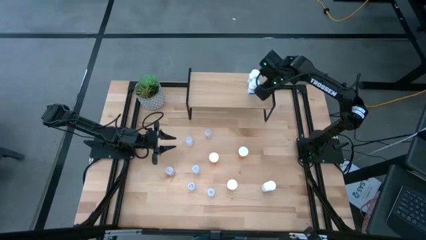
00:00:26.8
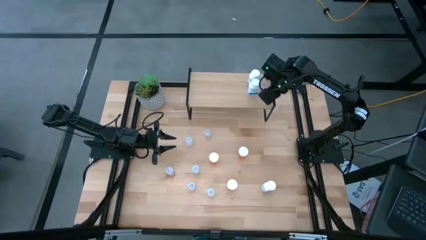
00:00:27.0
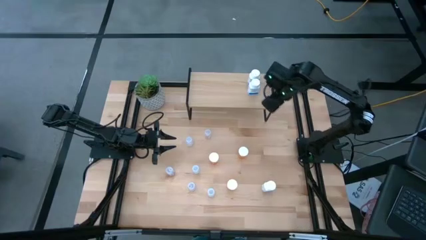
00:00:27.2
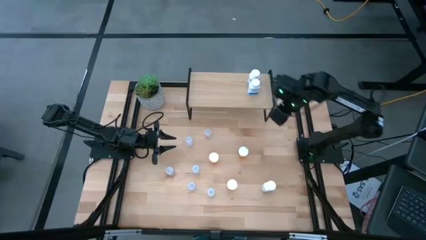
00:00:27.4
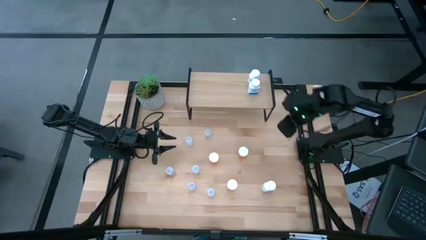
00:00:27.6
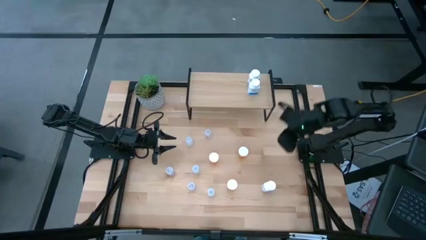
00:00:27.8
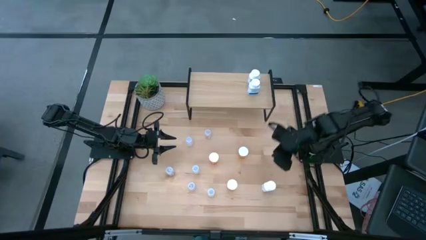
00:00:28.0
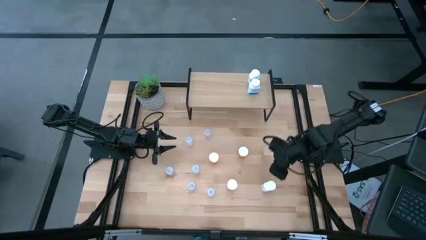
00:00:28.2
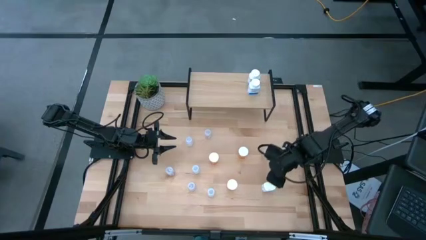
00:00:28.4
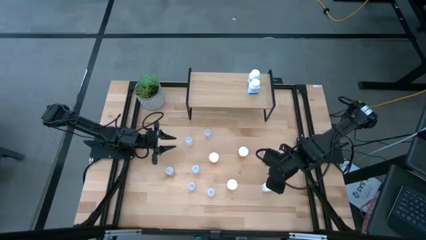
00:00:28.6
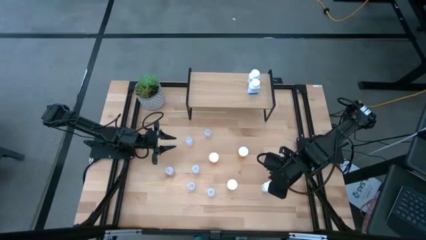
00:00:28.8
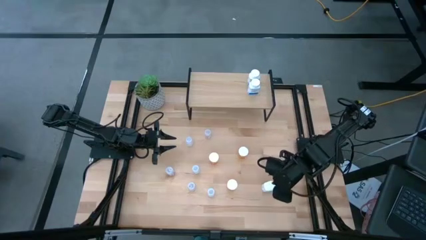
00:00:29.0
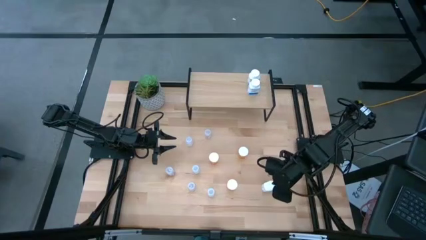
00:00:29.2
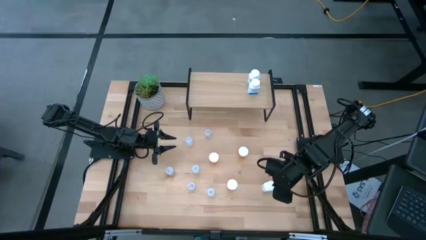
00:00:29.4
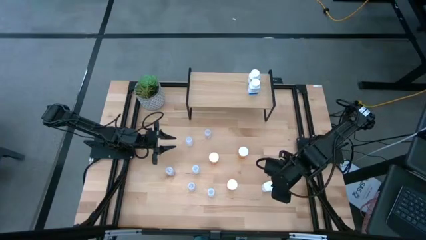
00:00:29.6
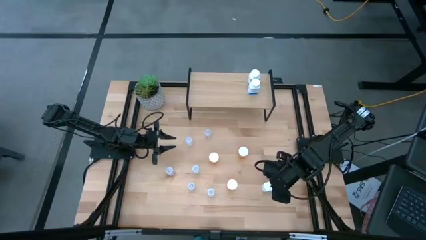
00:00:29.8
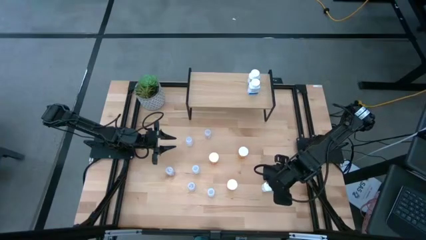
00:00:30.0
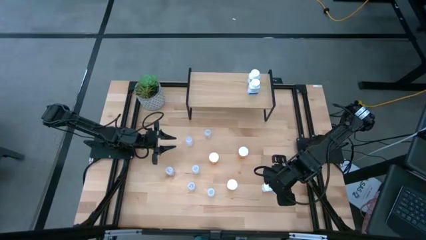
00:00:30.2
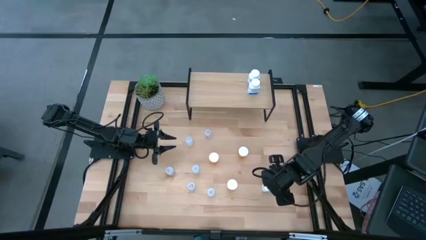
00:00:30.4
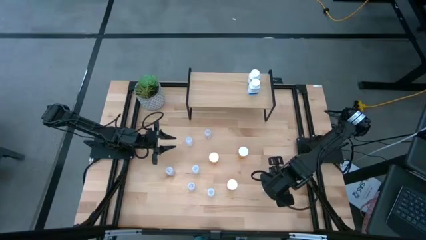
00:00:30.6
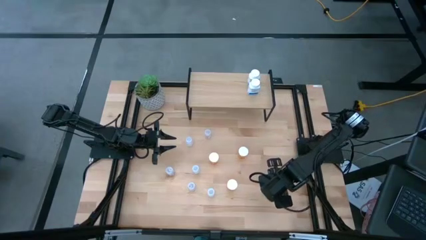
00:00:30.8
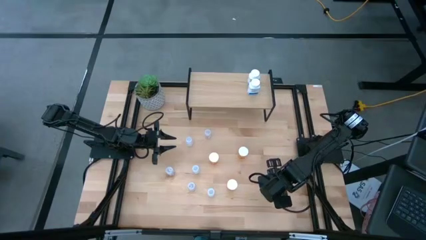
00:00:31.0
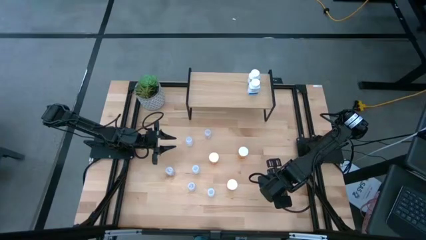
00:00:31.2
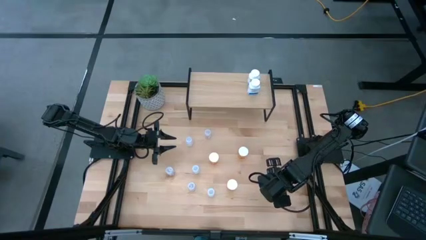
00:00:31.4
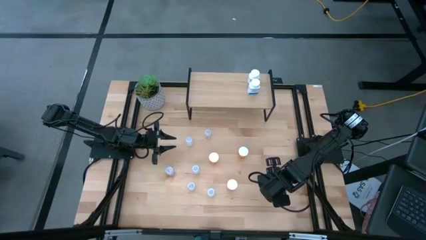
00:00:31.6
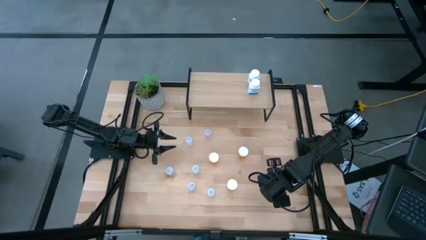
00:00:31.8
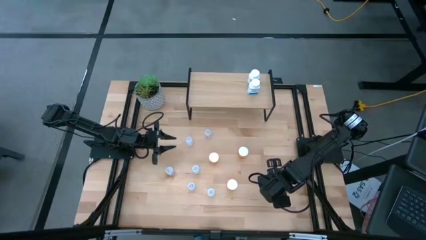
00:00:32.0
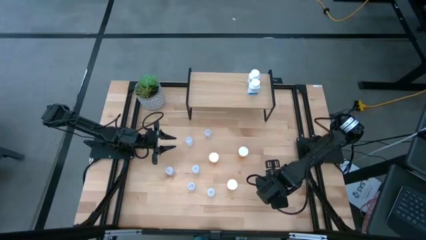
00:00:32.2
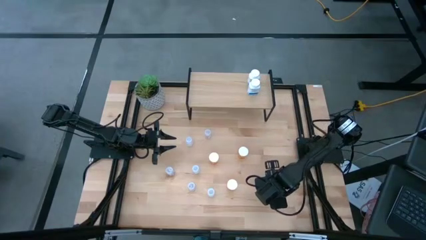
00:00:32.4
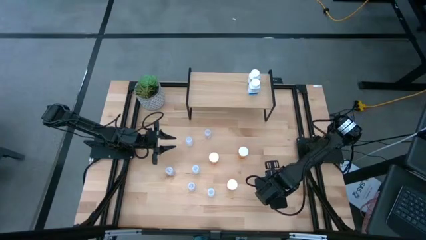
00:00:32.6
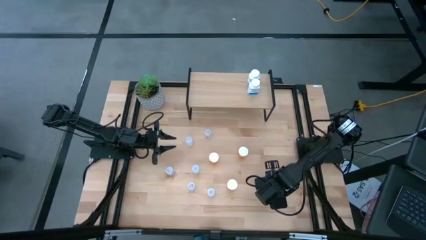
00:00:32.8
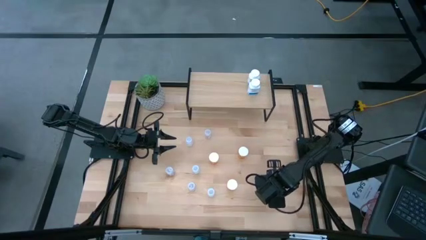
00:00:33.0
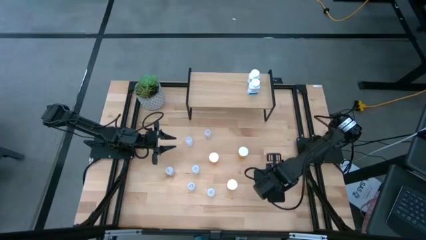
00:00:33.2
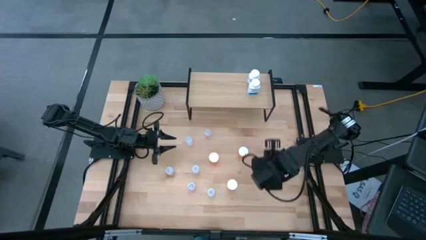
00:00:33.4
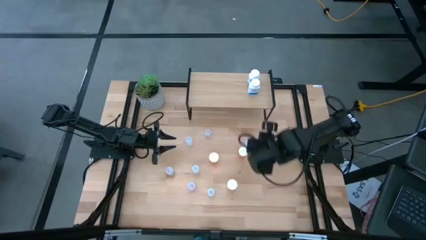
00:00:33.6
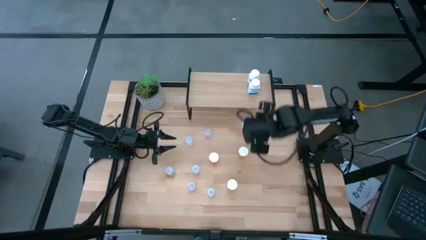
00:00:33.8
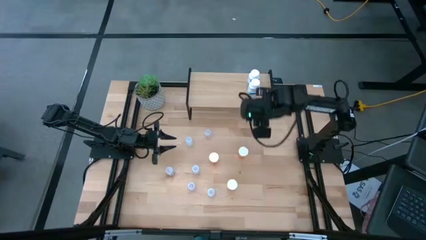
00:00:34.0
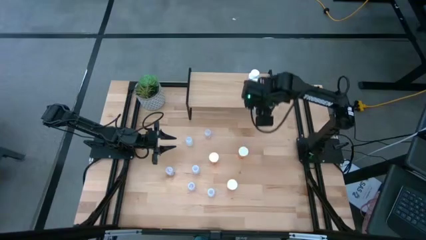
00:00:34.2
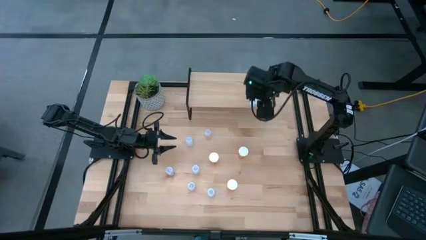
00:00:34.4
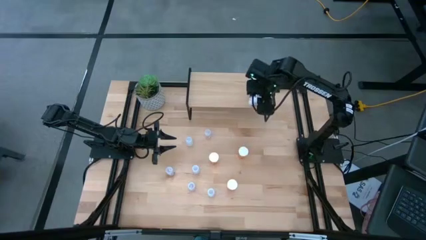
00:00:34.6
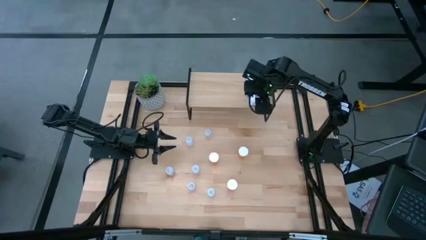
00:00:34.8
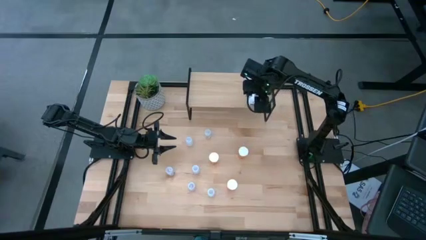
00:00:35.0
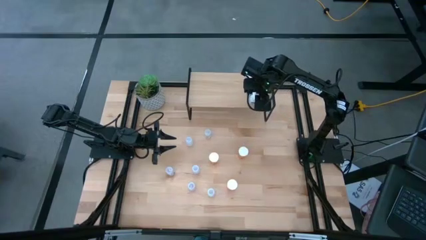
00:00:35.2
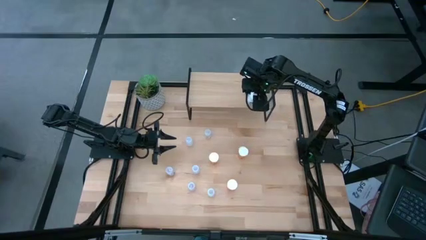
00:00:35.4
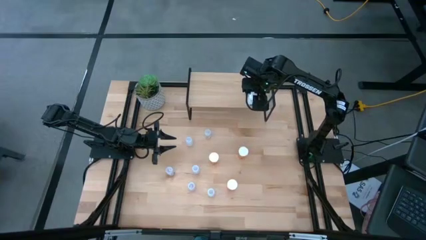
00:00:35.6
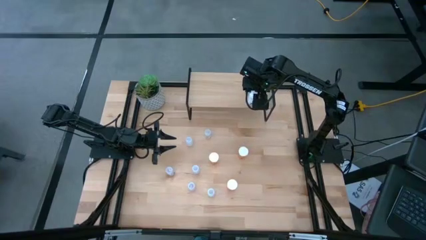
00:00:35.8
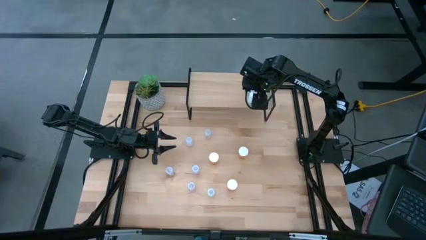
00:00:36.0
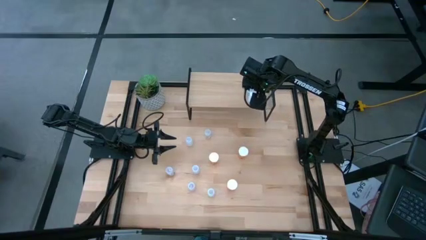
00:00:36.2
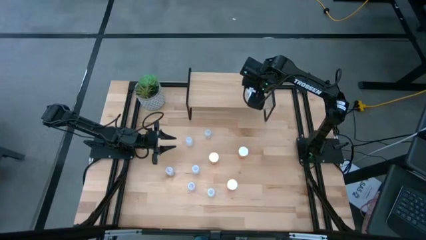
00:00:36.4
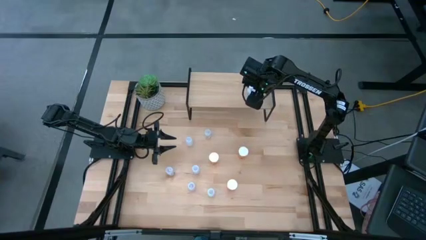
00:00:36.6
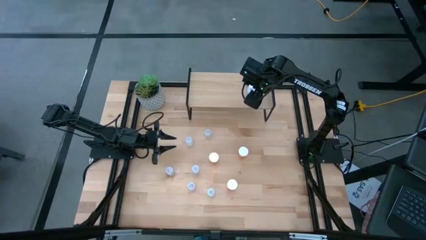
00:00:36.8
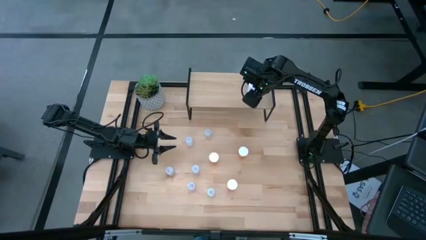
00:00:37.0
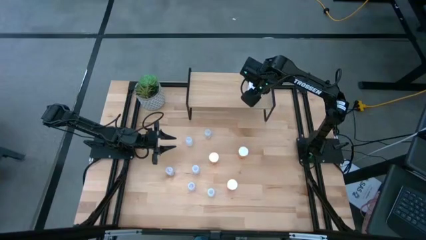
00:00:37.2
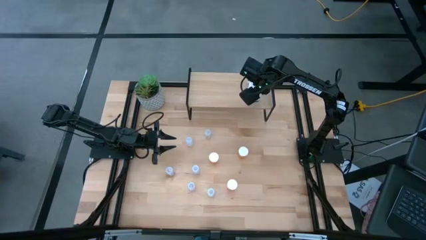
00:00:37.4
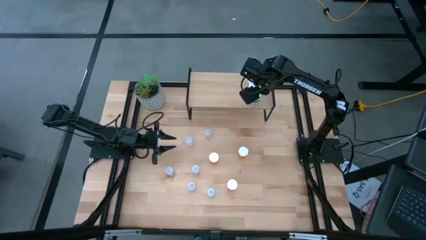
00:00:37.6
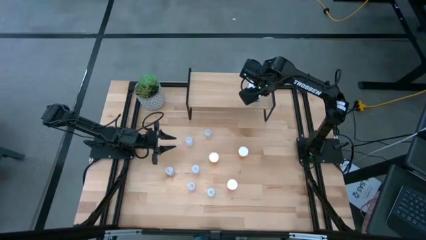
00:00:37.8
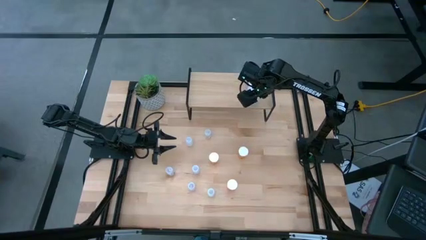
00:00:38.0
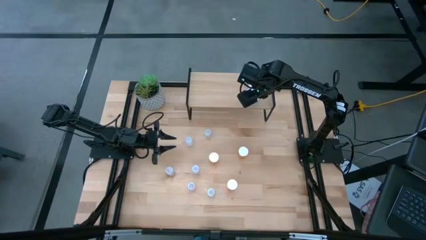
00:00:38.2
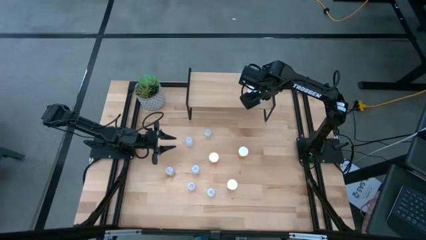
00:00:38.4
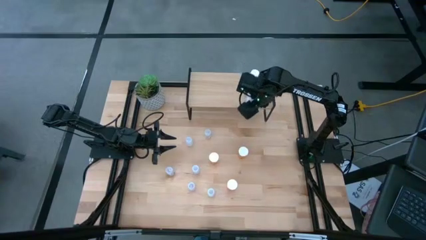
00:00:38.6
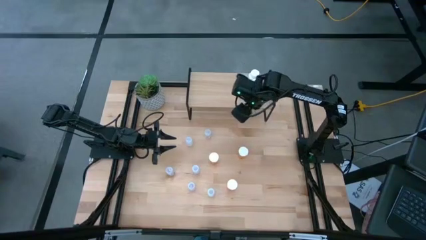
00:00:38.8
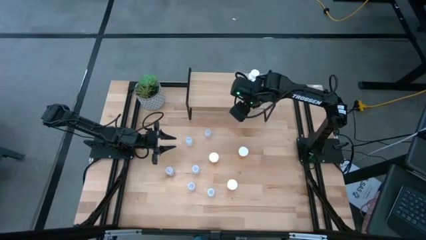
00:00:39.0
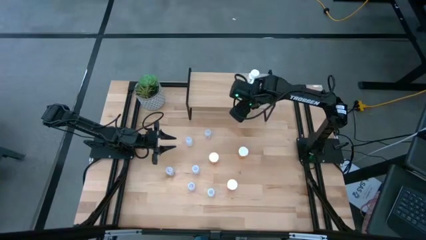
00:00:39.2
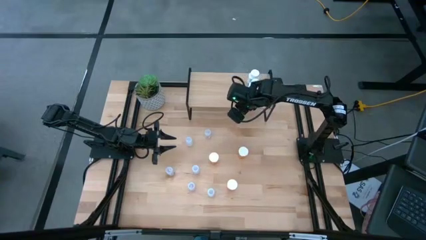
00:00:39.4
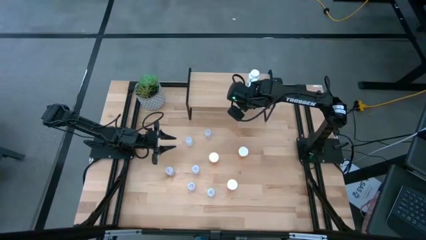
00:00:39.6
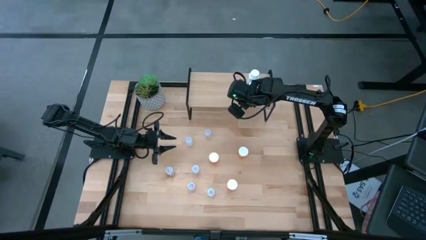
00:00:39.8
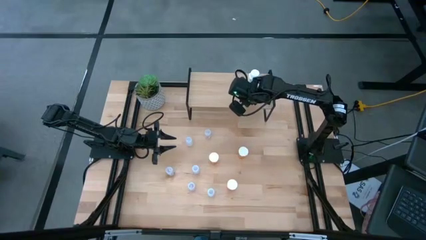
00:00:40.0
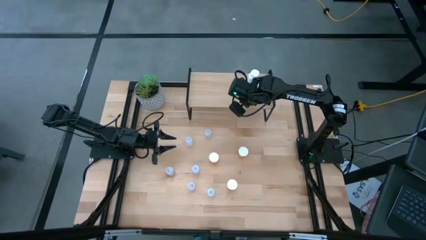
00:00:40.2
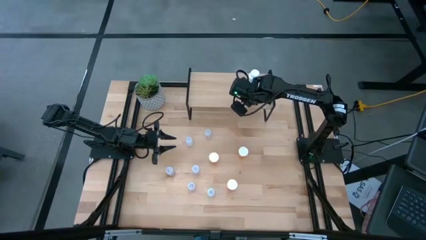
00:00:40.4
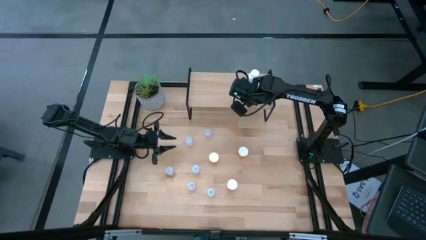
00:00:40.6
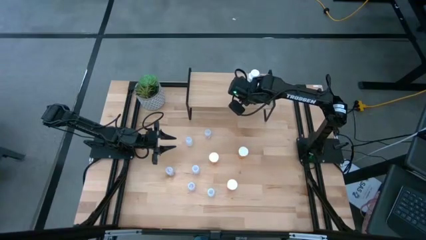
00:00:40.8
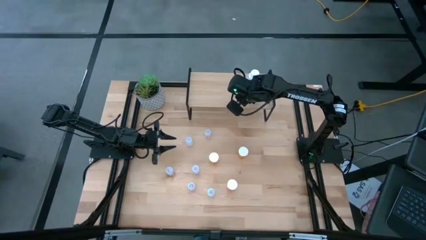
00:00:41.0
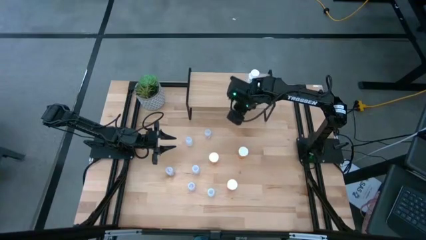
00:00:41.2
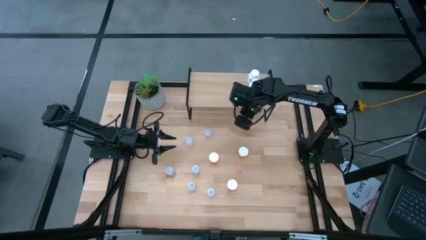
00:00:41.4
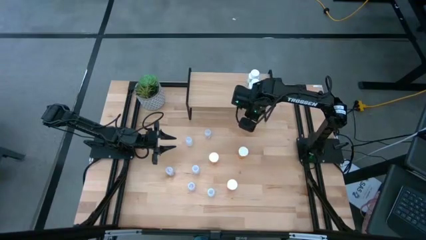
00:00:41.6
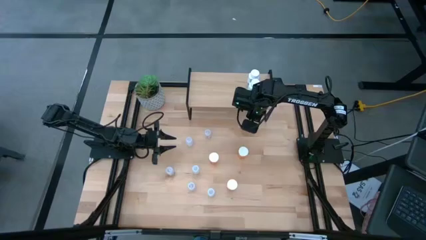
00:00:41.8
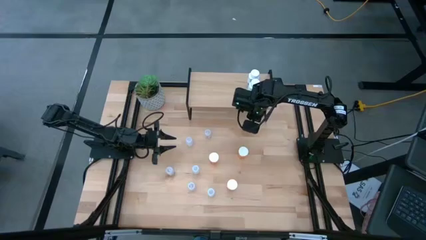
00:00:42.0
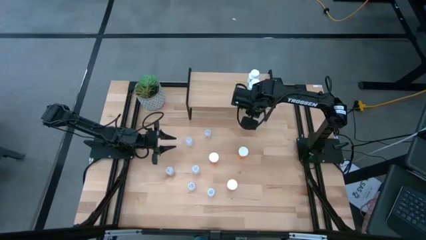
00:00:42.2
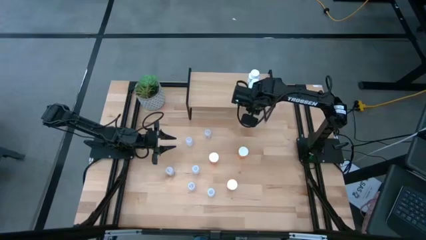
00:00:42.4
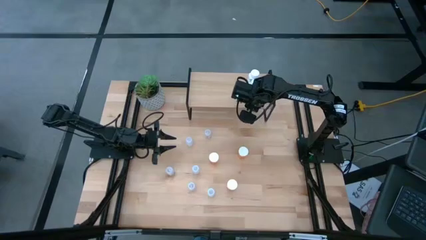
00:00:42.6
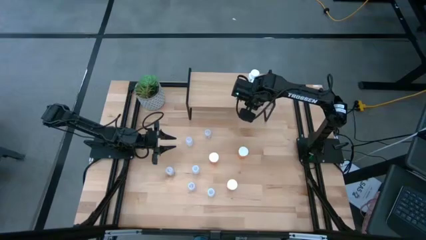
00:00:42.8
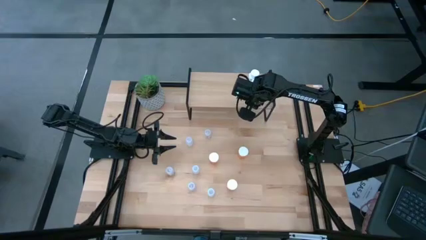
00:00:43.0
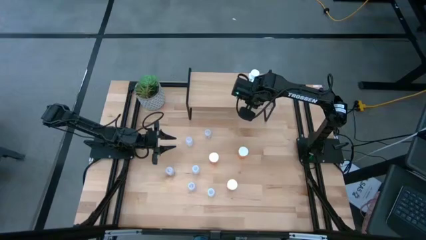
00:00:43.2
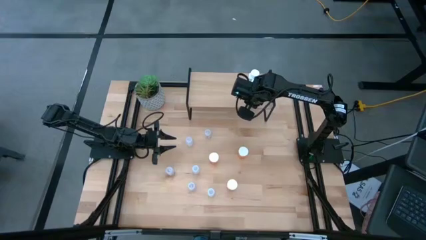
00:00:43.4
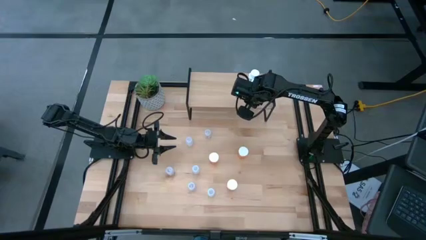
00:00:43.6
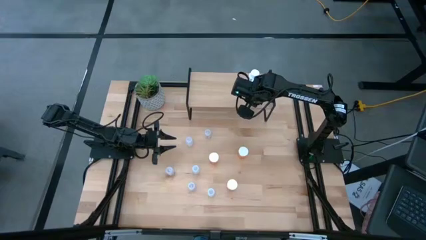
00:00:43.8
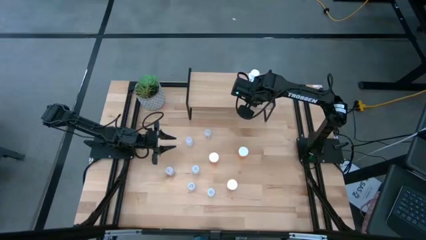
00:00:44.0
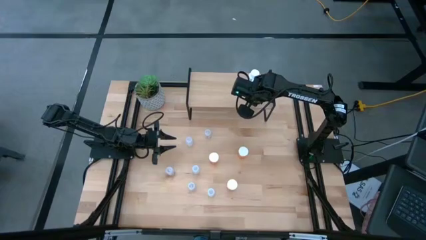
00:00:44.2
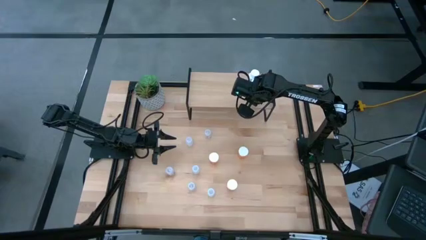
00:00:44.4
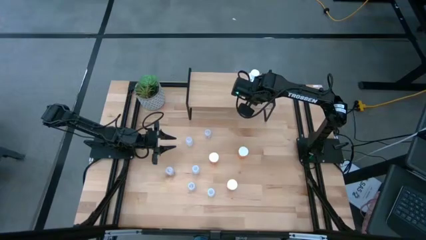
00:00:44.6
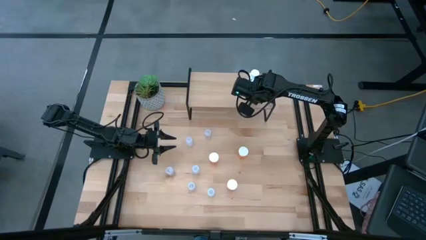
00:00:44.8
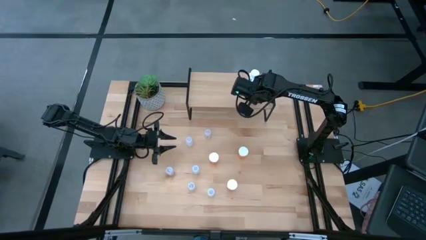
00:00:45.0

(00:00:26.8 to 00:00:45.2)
Task: Pick and place medicine bottles onto shelf by color
Put the white supplement bottle on the shelf aligned with the other white supplement bottles
